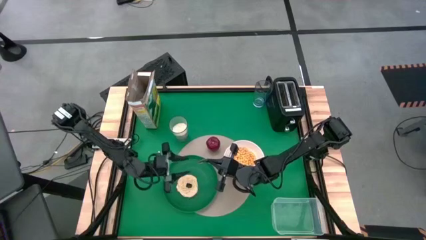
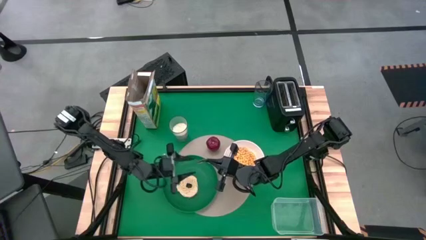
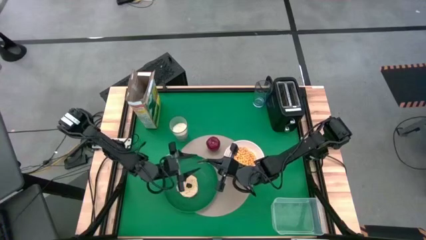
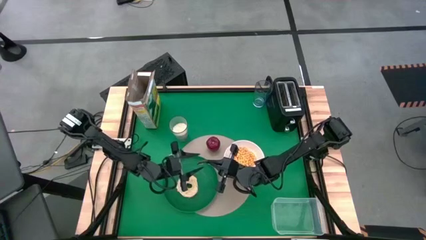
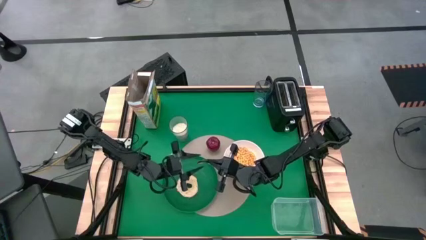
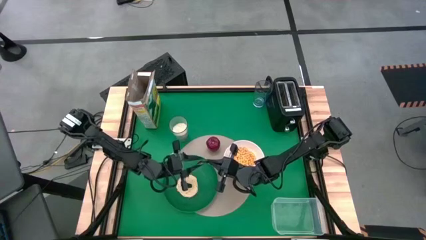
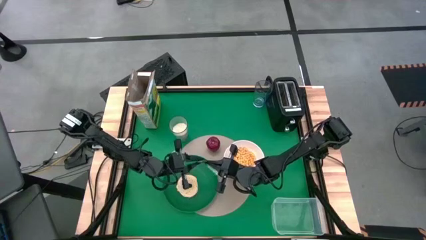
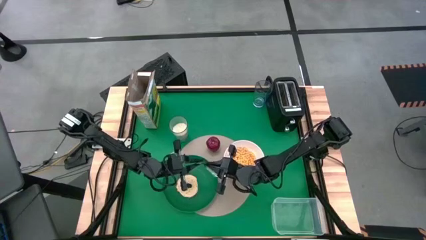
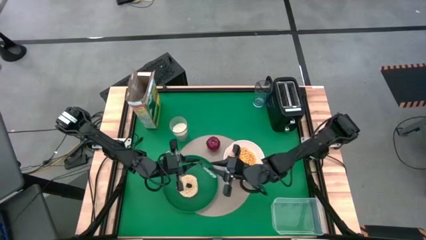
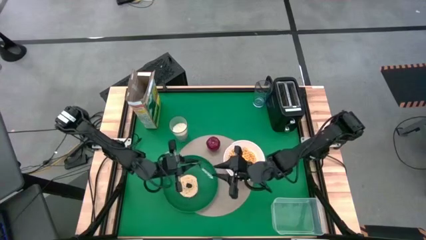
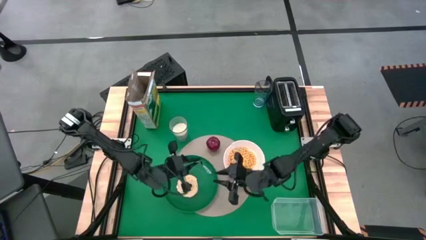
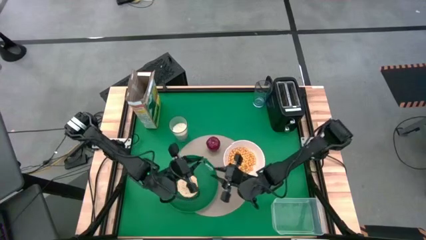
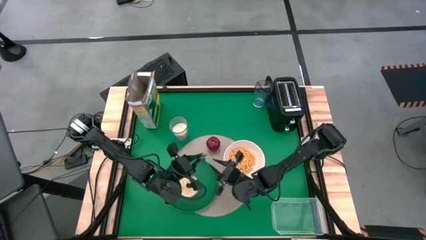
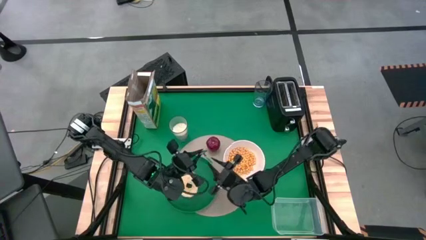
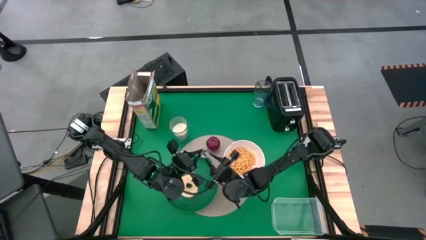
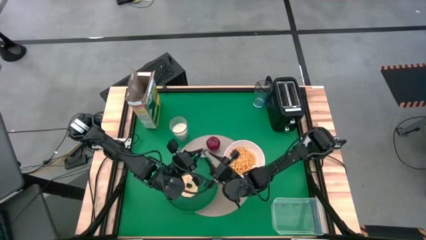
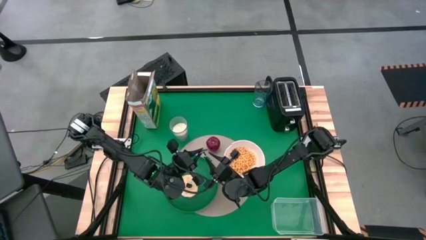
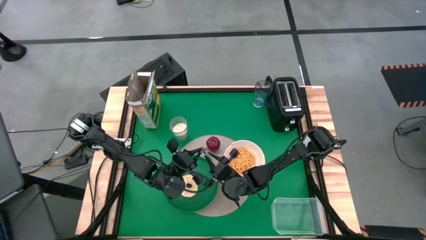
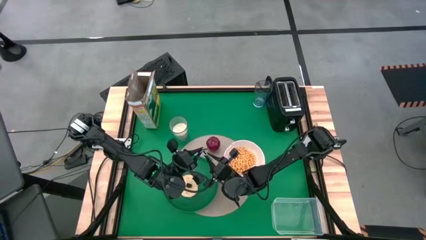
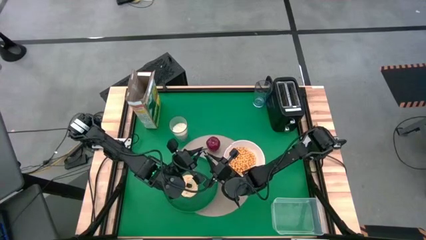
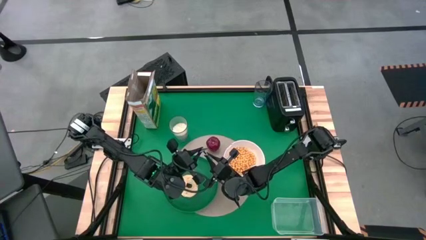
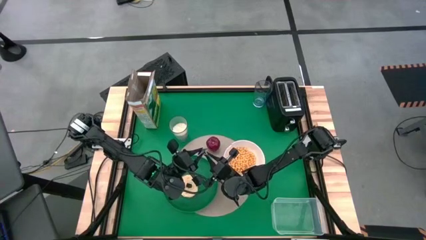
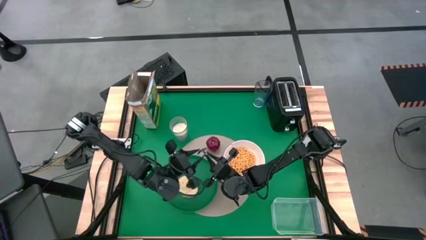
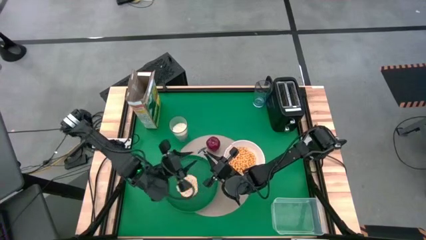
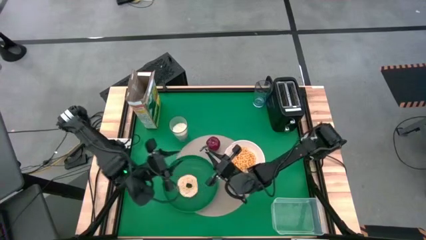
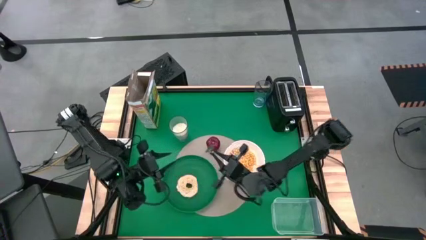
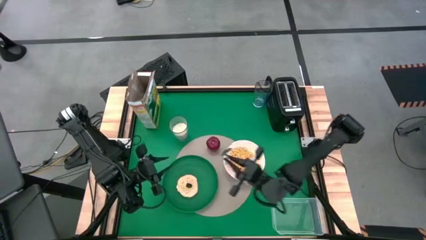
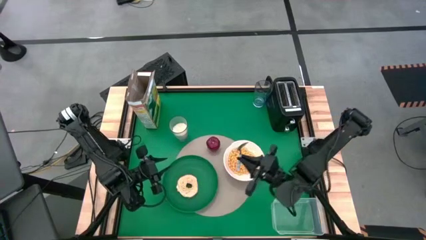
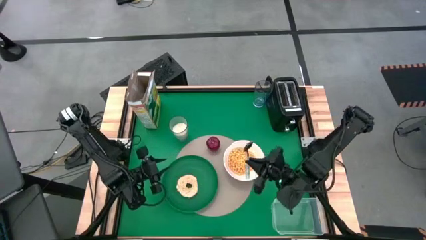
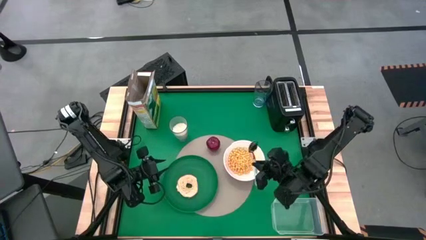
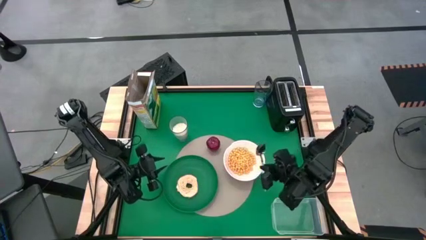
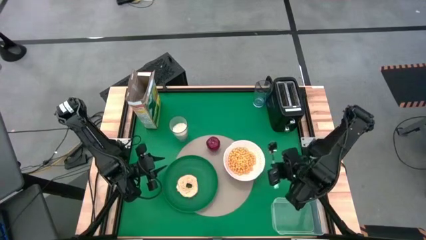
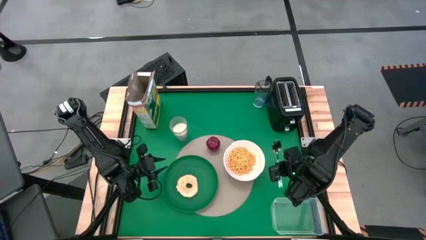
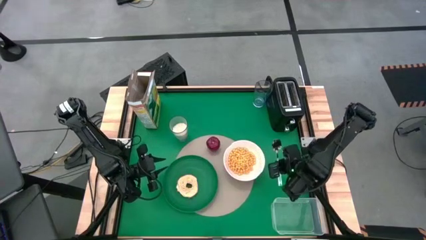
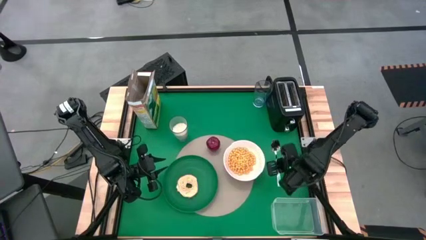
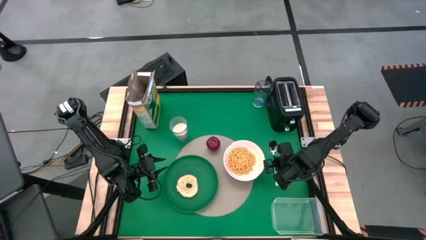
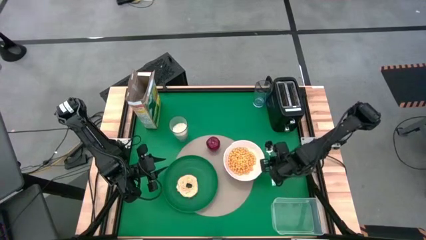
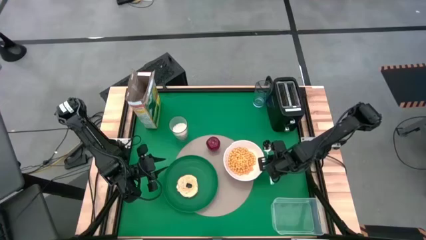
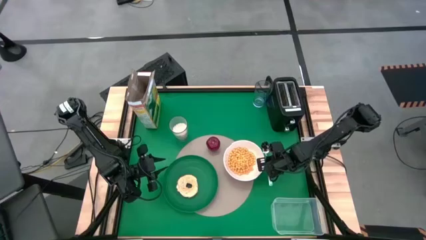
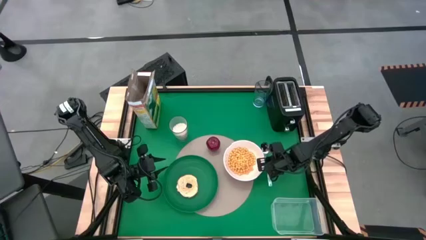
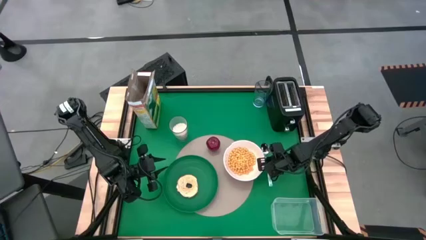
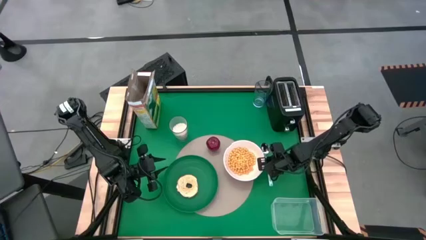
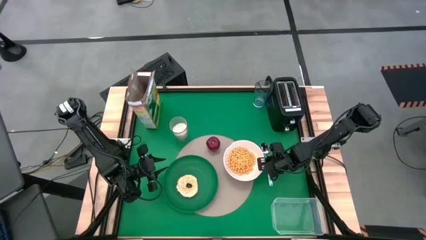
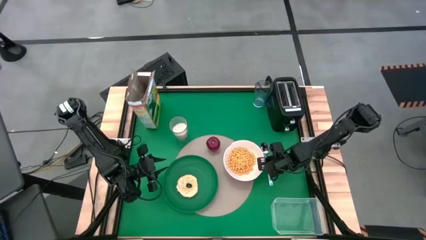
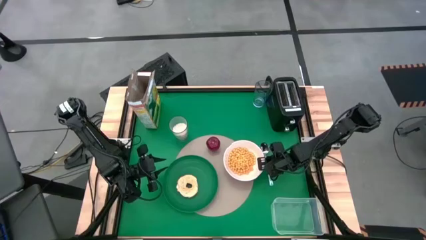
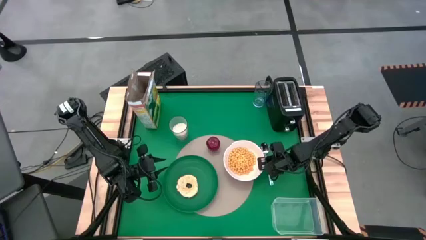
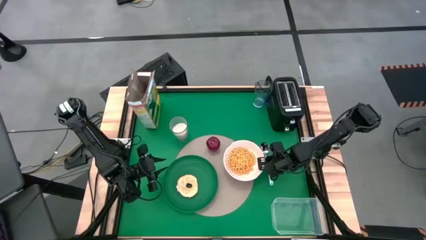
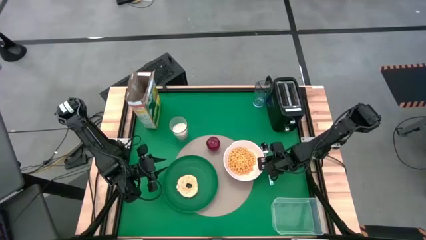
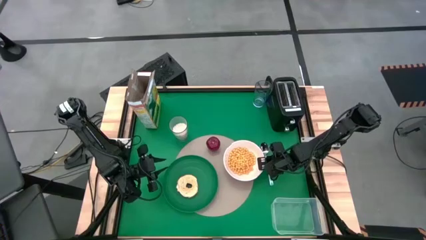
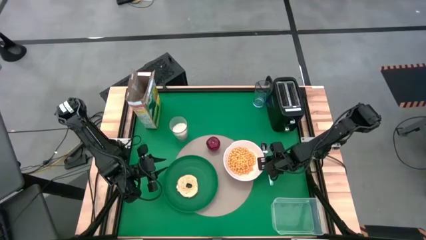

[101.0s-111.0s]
Task: Arrange a breakfast setting
Put the white green spoon to the right of the white bowl on the table

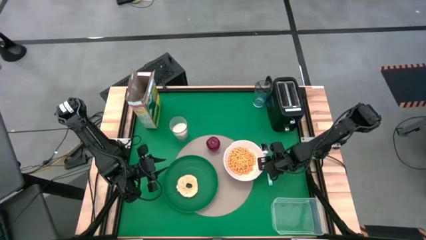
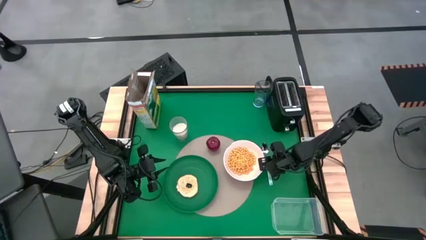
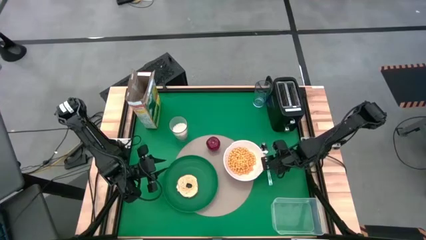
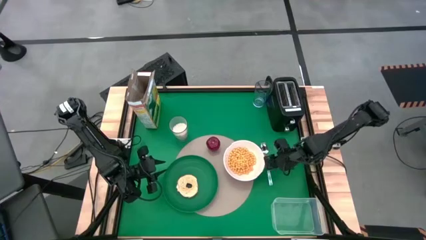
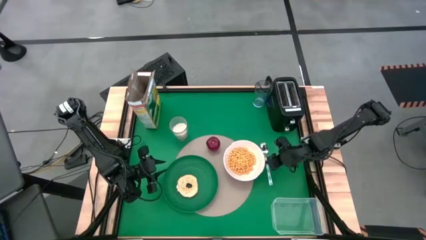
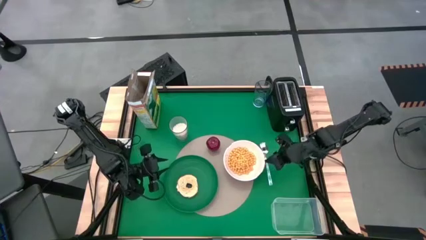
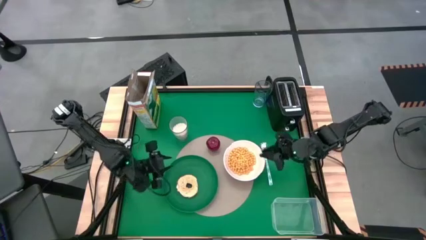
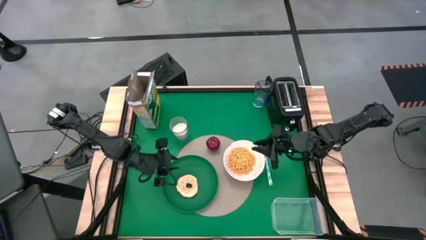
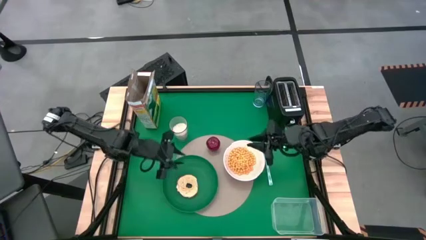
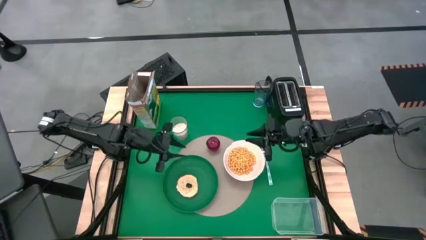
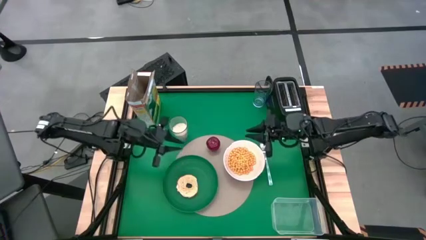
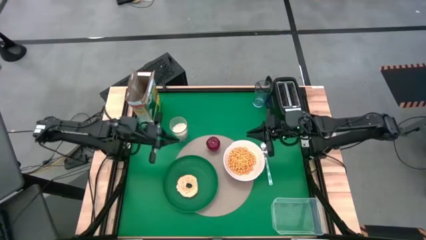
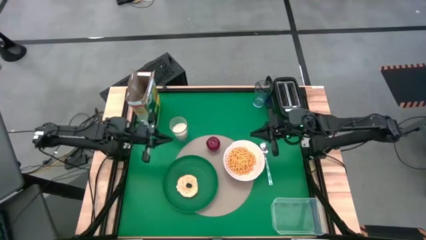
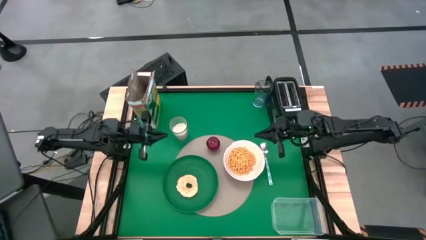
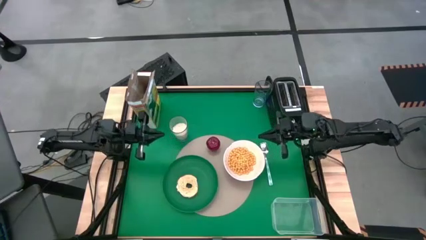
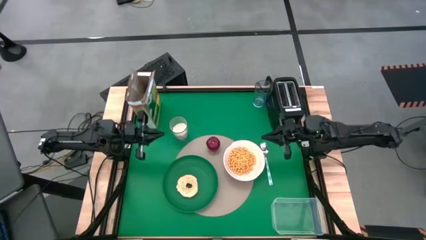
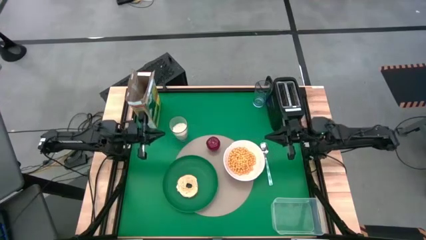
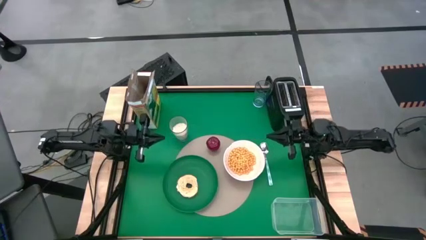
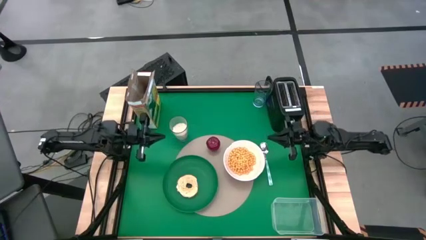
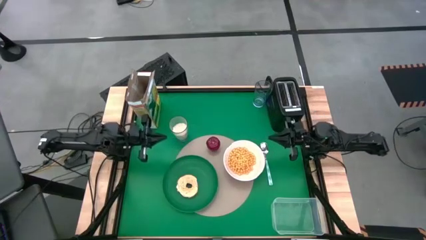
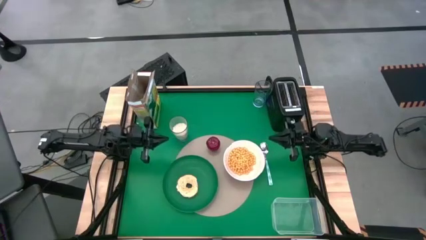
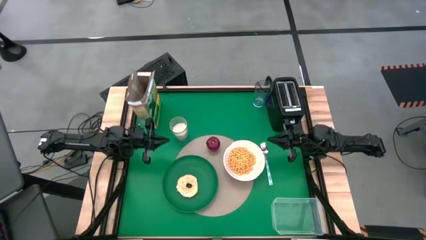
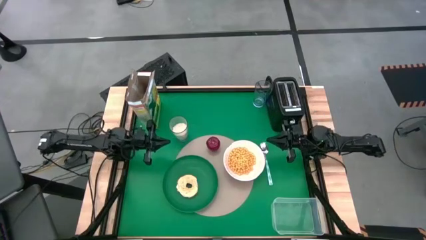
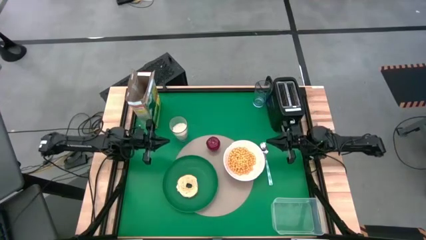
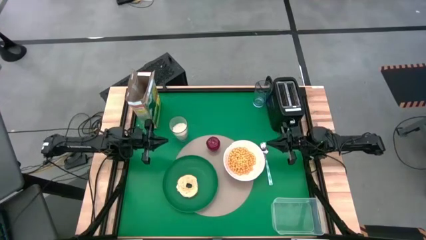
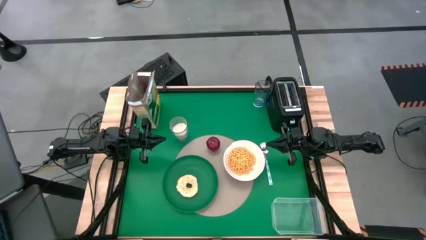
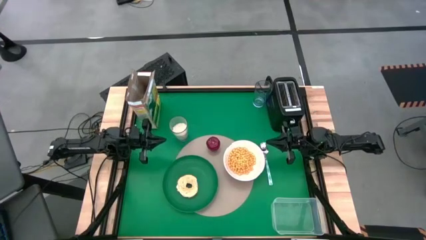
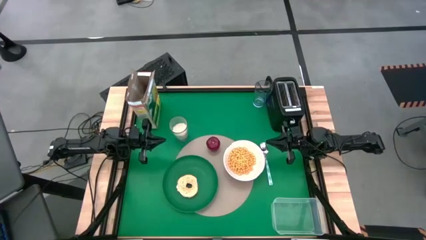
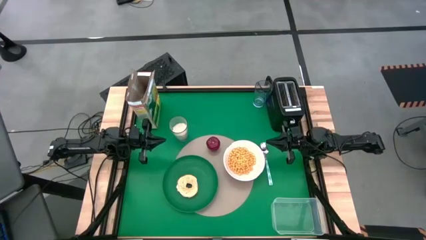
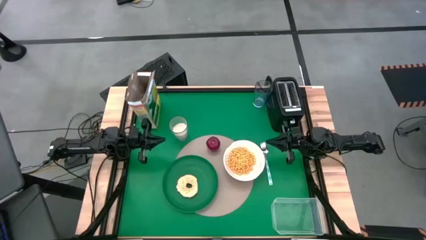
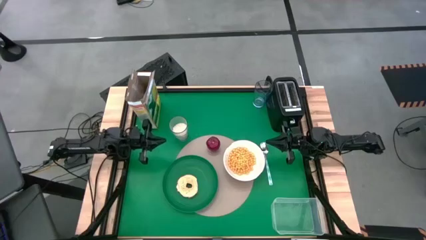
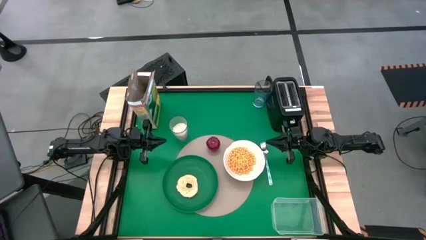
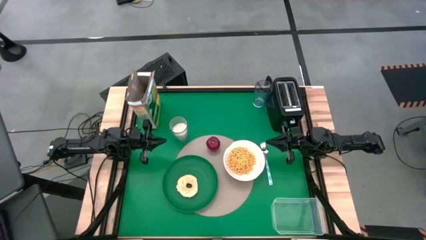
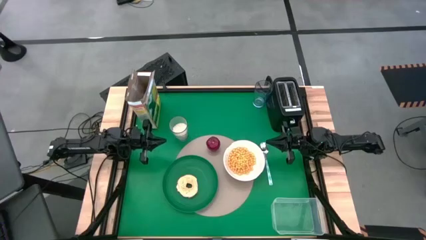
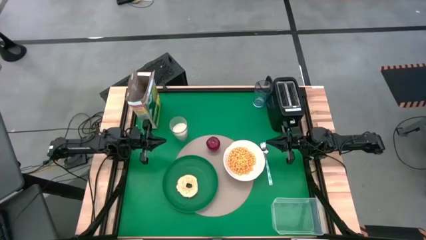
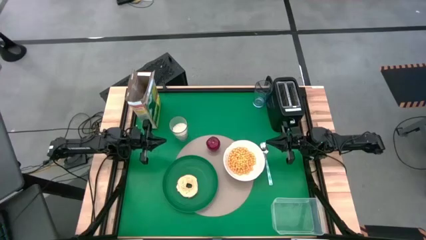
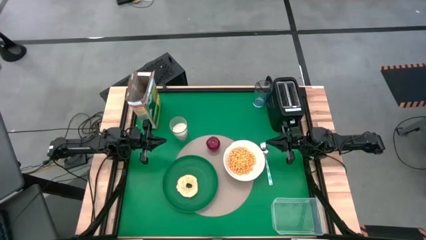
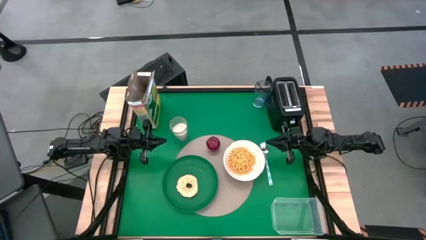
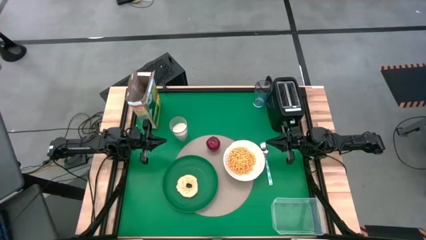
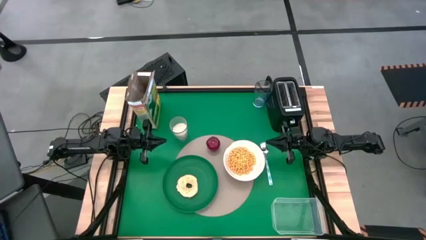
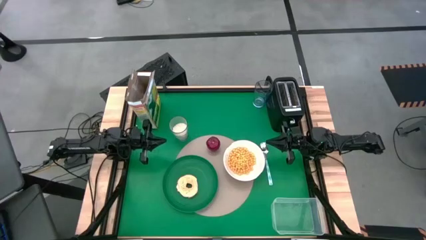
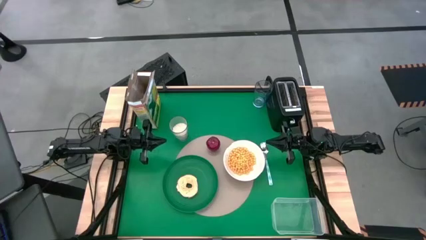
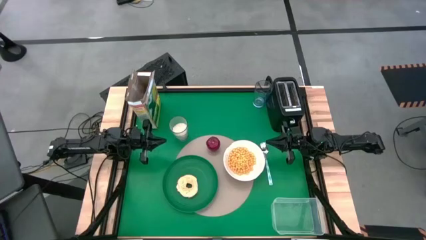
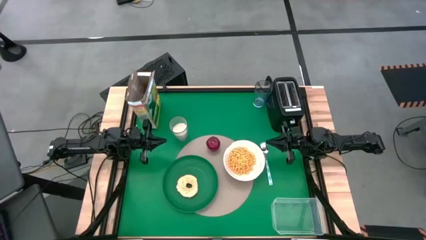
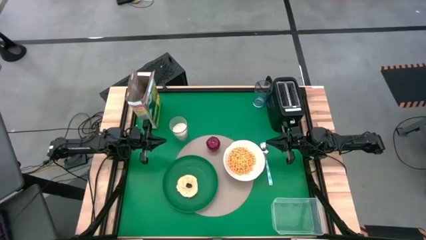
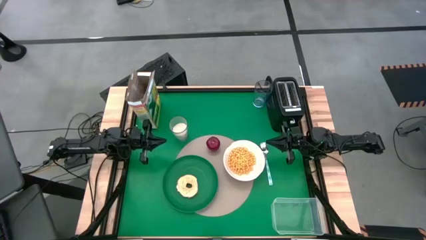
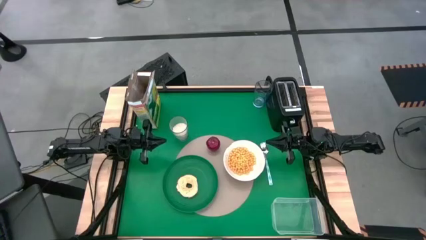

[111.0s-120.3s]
Return to Home Position
